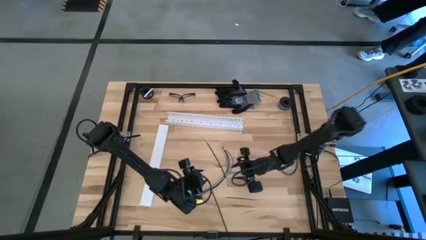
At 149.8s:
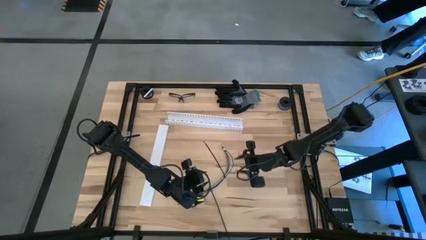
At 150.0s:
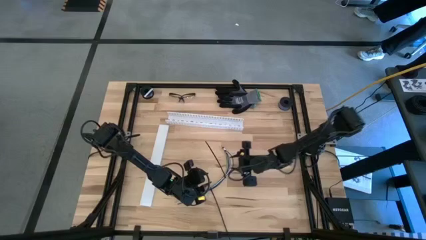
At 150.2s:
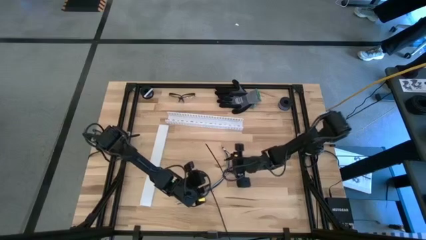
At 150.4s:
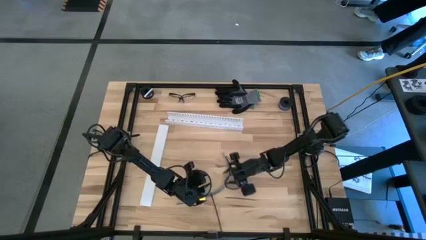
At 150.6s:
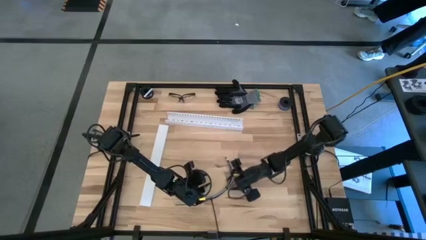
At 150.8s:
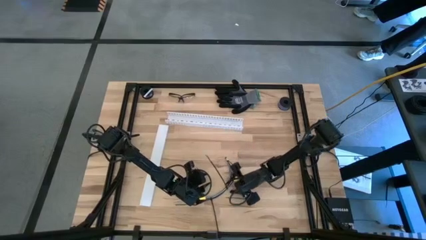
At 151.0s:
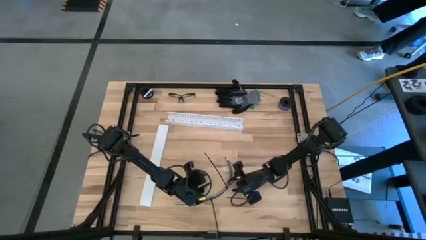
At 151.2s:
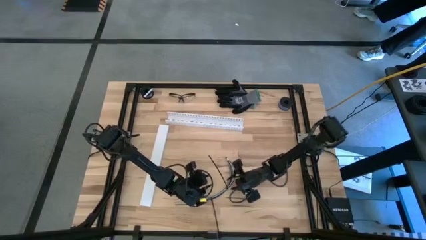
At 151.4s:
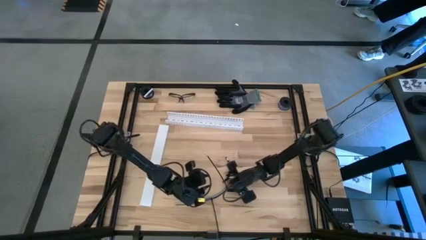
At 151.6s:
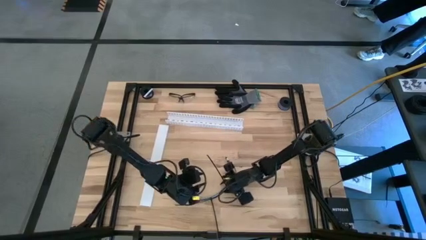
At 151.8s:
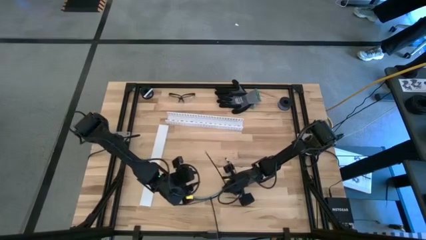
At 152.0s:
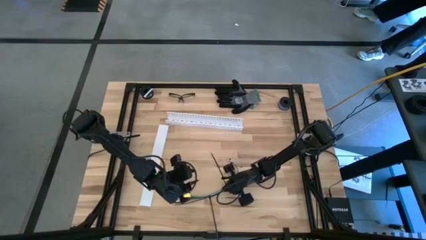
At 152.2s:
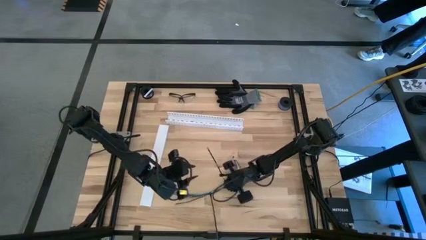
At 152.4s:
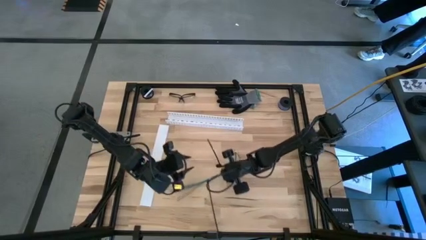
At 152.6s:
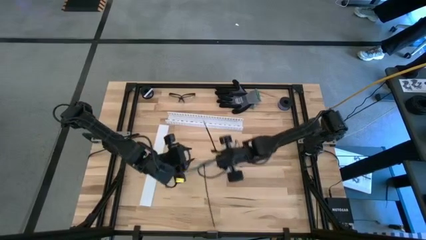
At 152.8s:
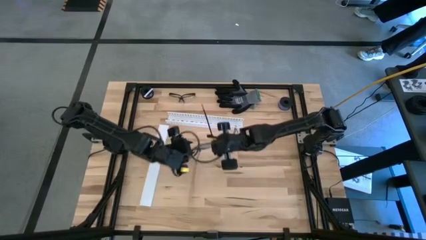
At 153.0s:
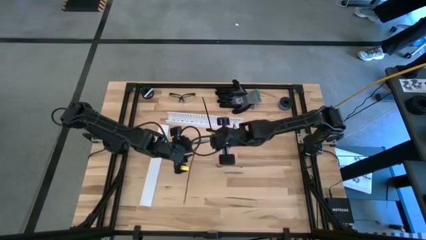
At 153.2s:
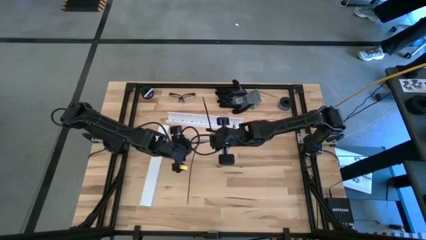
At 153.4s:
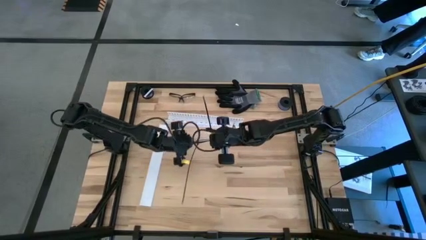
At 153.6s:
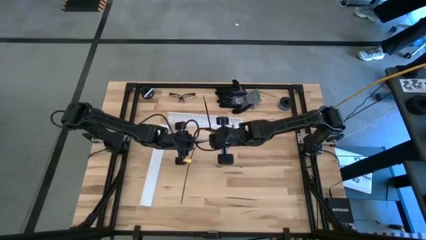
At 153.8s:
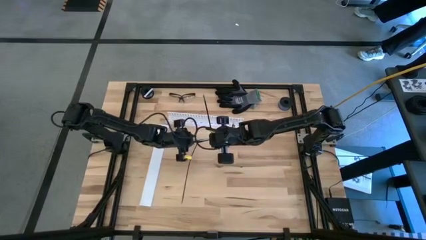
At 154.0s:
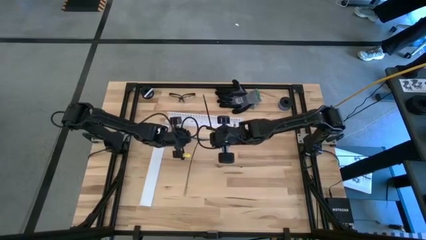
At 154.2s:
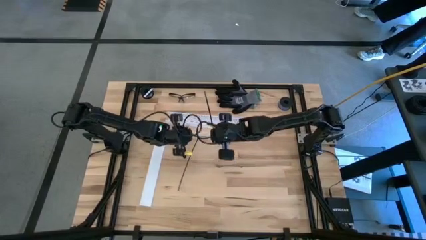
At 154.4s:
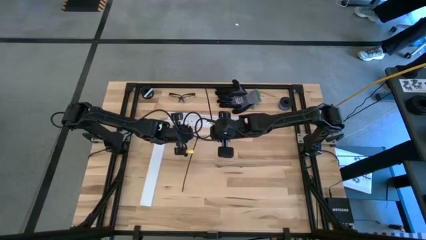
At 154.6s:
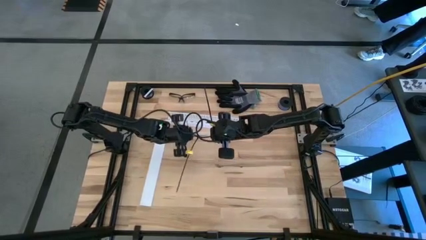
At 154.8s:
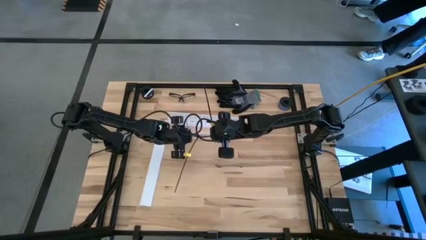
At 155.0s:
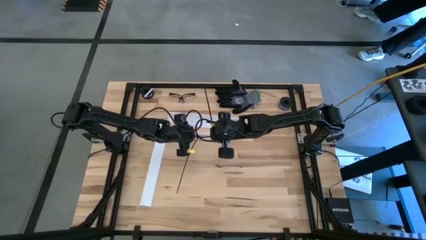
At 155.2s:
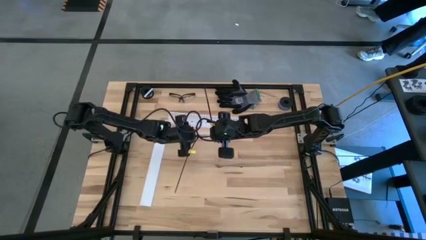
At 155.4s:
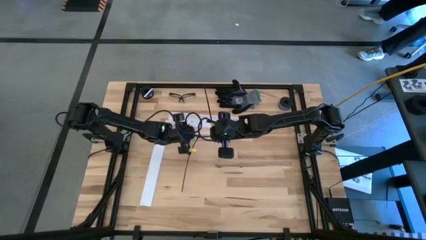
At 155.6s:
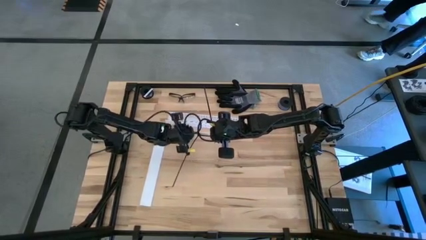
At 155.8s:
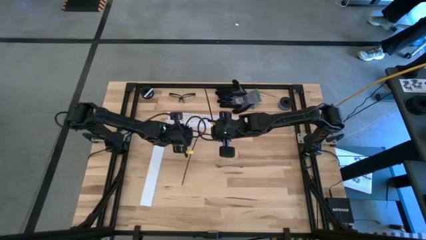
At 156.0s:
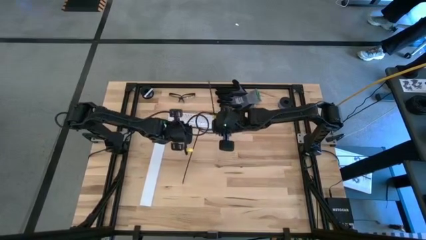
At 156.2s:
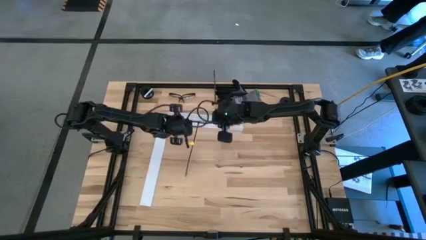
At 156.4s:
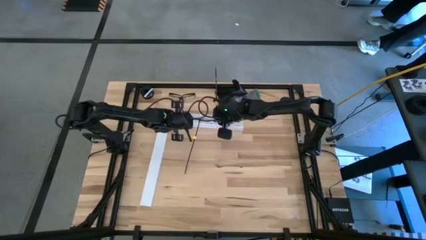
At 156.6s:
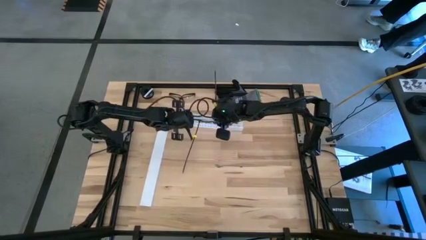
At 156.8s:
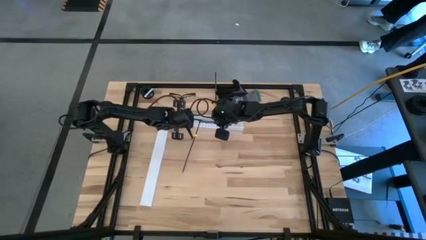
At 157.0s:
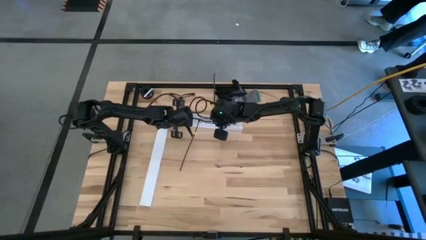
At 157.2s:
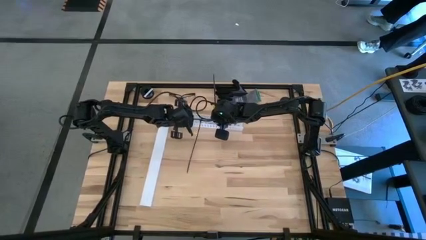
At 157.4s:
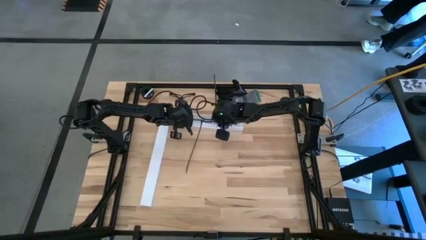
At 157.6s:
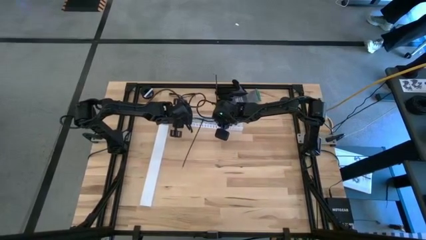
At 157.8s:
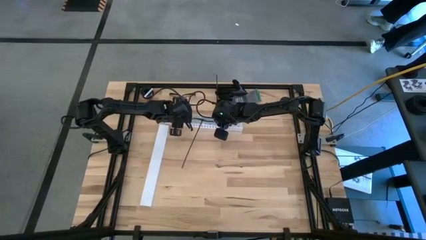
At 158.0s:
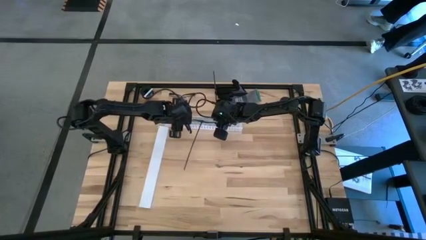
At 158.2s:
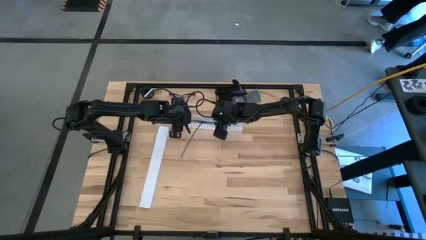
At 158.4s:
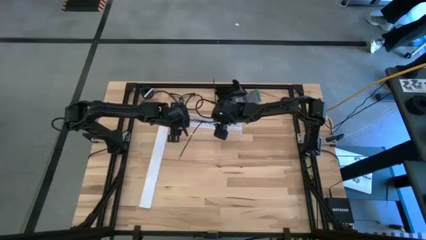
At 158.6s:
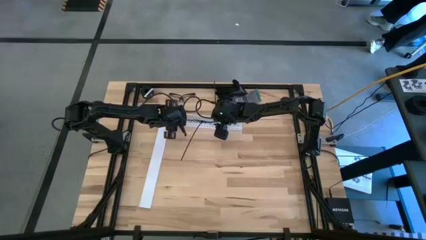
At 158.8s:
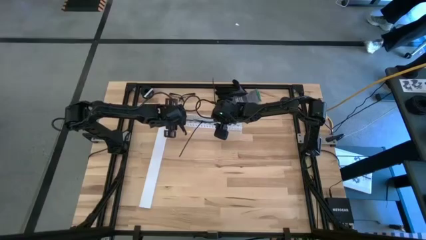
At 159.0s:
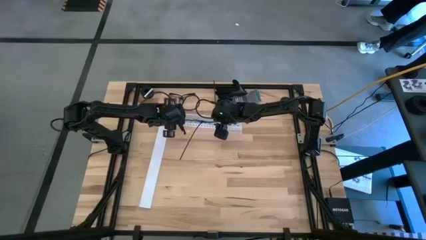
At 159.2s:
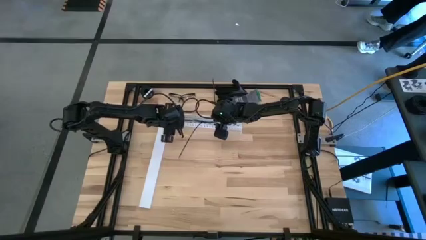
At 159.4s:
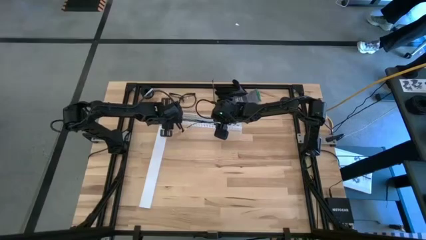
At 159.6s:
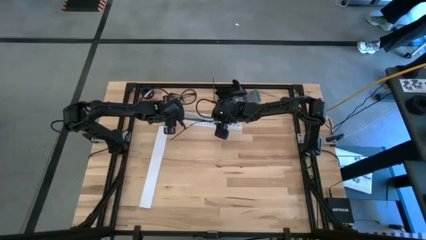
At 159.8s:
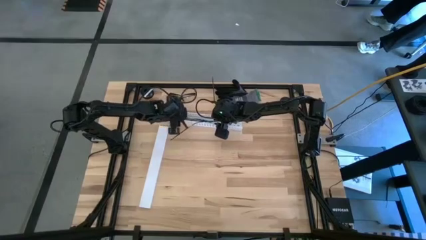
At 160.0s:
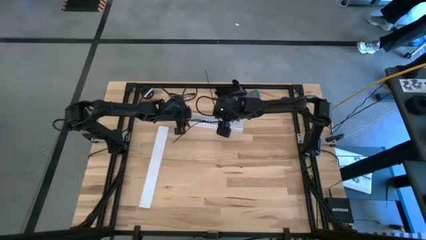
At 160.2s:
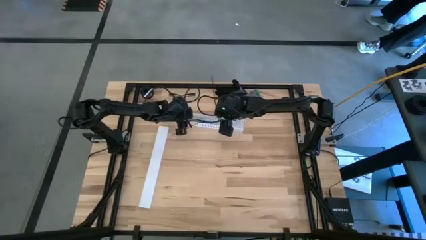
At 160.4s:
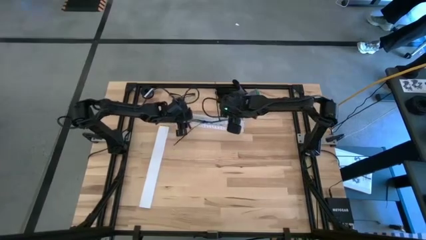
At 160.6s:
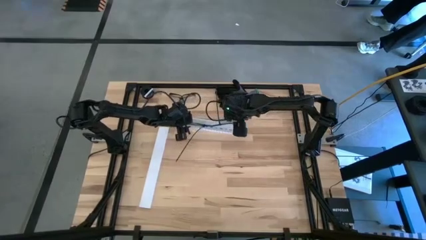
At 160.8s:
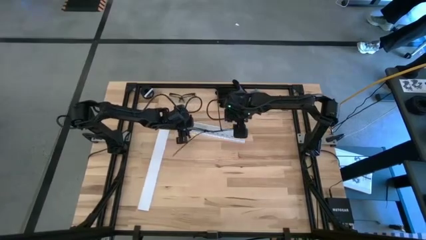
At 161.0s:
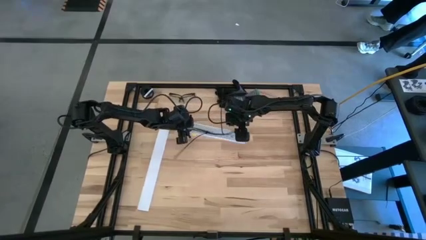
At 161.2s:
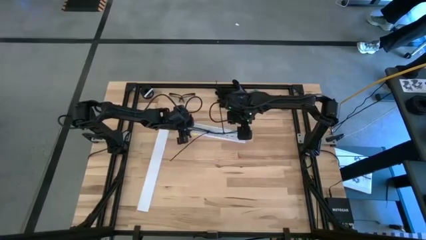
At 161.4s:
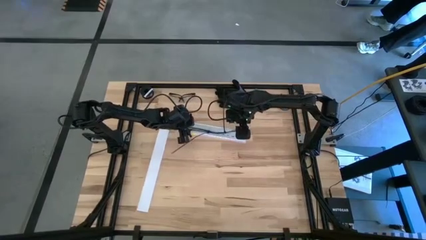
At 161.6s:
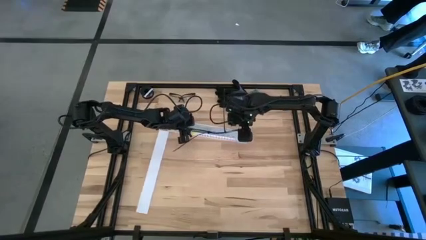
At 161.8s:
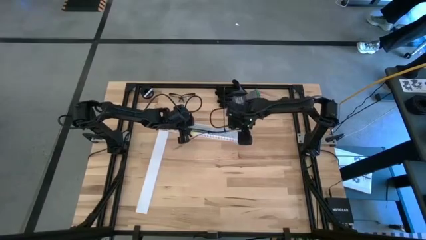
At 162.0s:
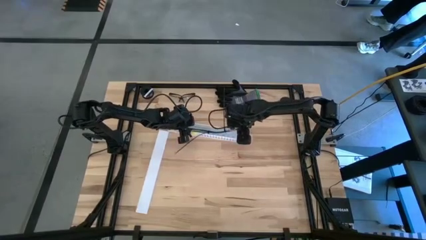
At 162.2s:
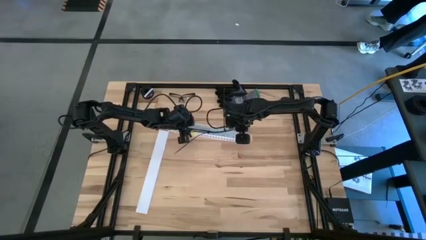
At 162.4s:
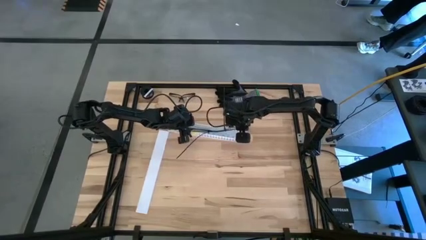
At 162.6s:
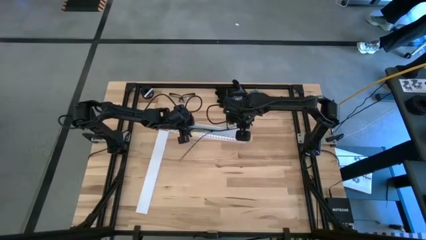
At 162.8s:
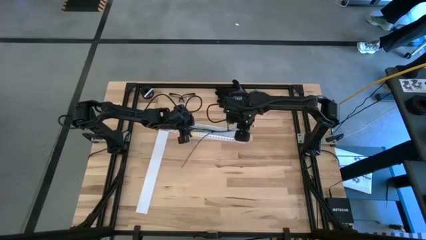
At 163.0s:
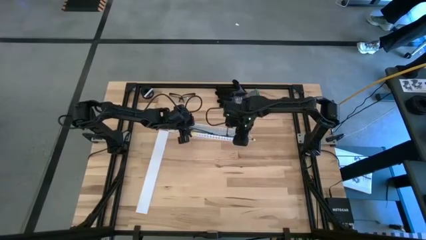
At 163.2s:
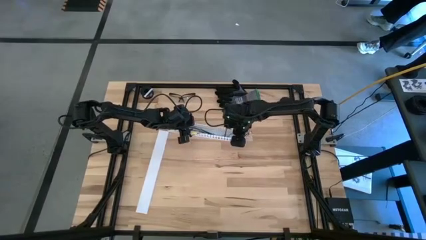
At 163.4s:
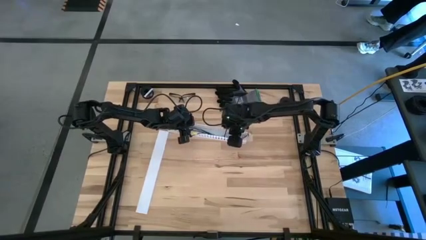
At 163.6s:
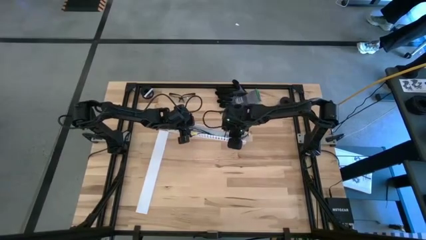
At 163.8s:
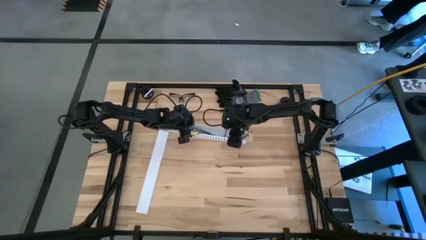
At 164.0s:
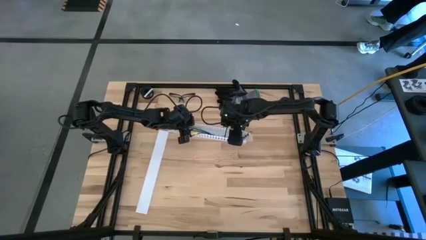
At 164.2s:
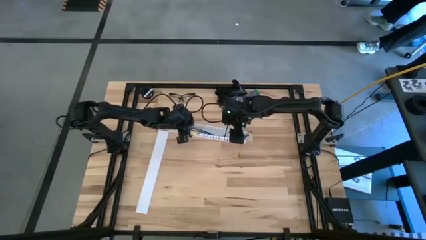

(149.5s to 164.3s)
Task: Ziptie cables
Put the black zip tied cable wires into the white cable duct

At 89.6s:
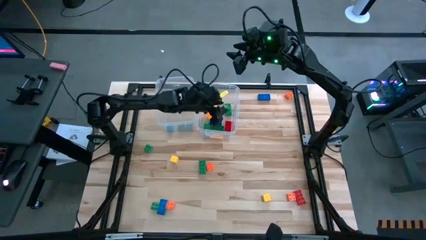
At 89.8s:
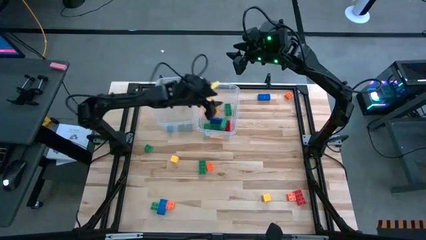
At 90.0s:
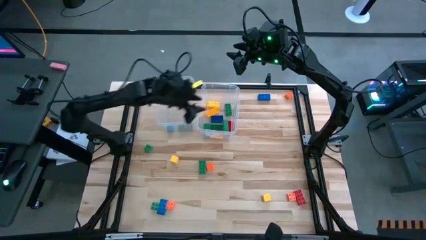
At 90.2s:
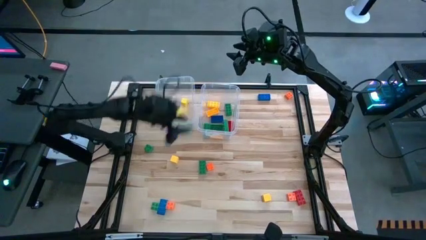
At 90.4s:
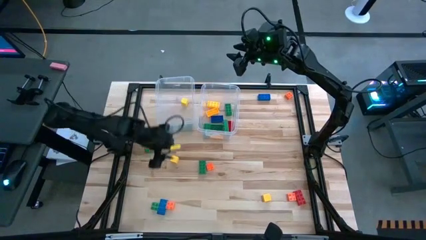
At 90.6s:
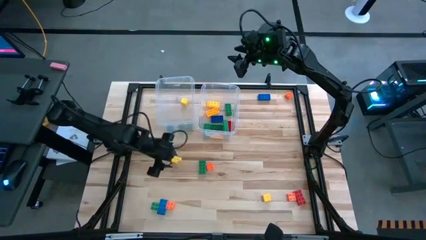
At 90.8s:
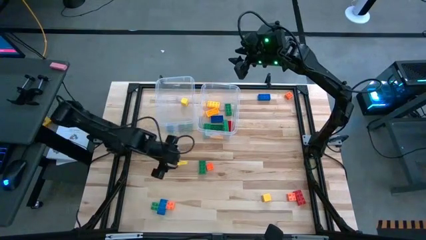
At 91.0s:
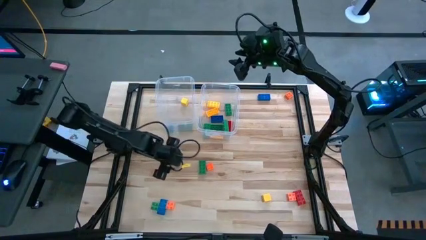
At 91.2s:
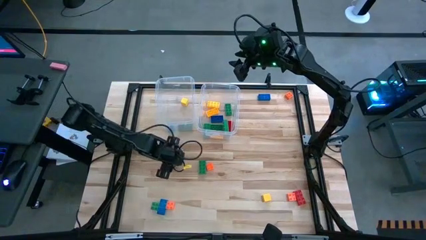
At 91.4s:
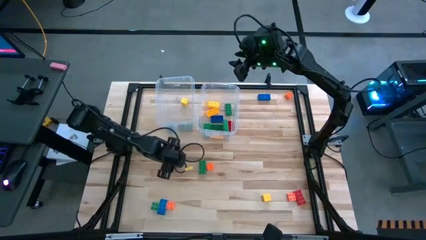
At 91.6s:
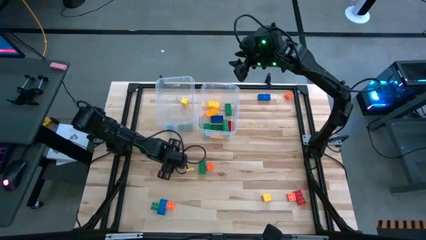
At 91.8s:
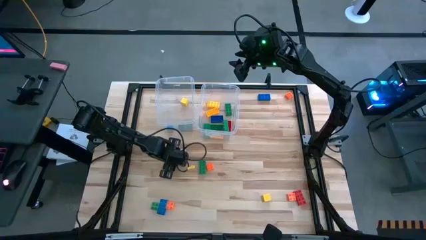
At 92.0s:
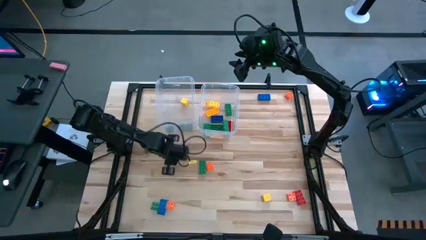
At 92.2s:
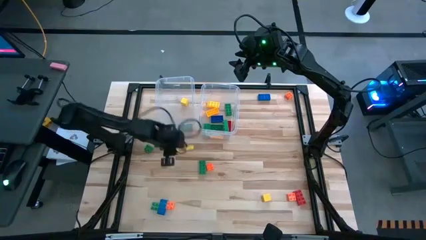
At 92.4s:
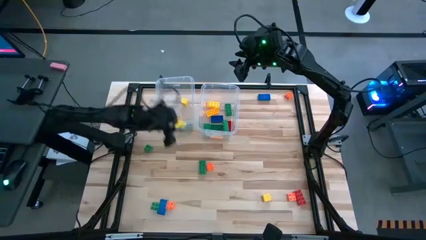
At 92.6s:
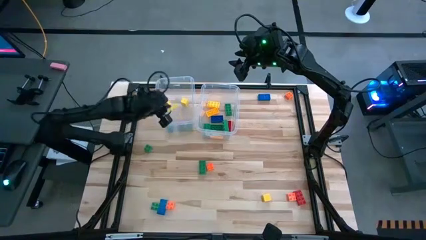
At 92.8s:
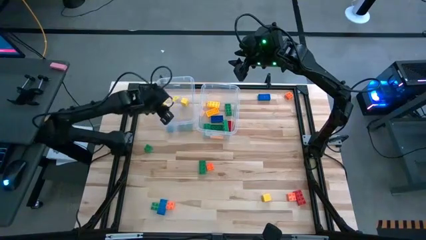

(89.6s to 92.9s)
Task: Sort blocks by size
Put the yellow blocks into the left transparent bin
